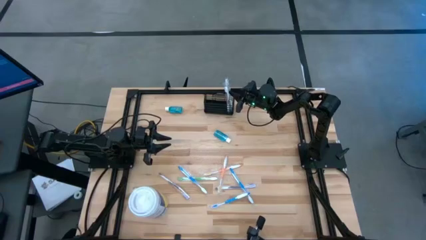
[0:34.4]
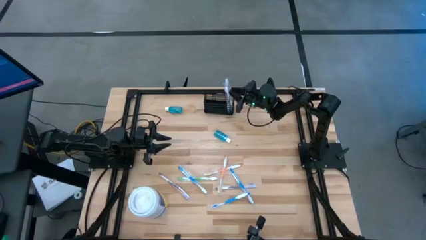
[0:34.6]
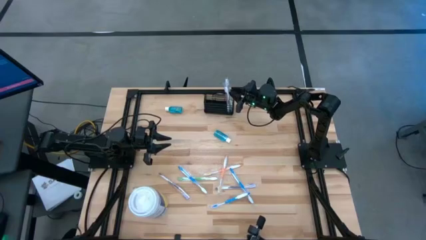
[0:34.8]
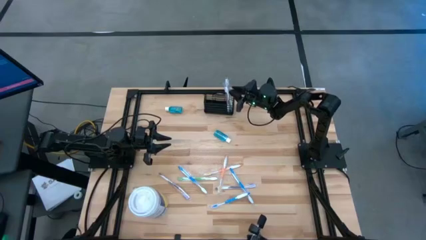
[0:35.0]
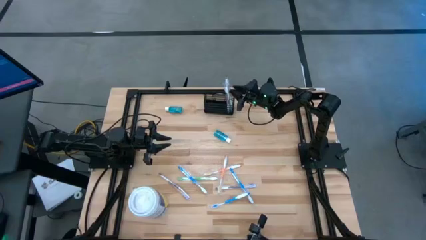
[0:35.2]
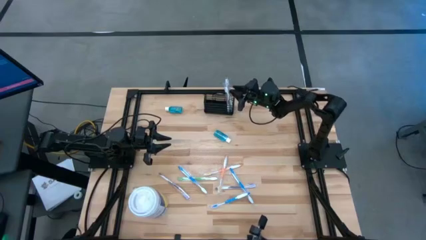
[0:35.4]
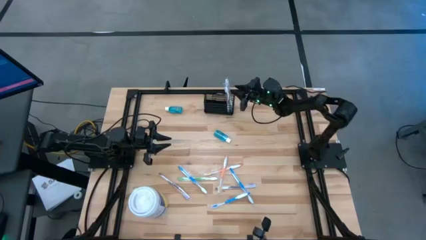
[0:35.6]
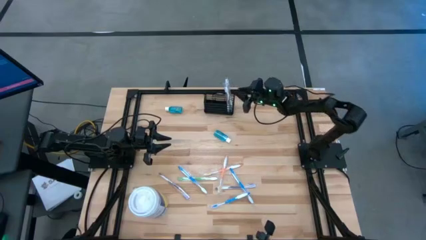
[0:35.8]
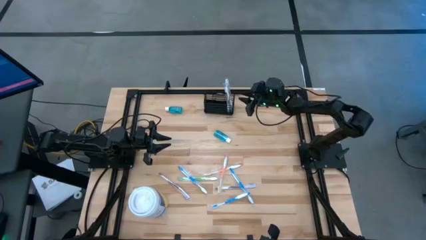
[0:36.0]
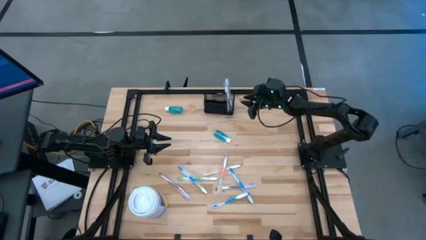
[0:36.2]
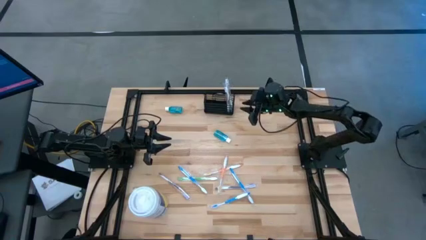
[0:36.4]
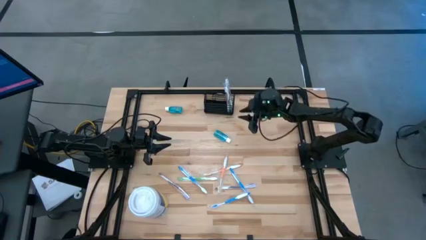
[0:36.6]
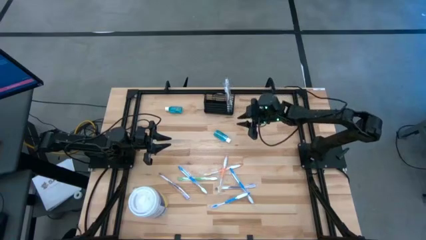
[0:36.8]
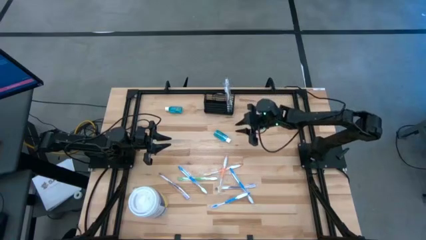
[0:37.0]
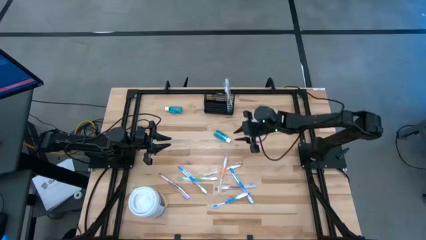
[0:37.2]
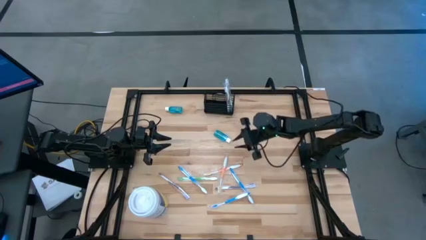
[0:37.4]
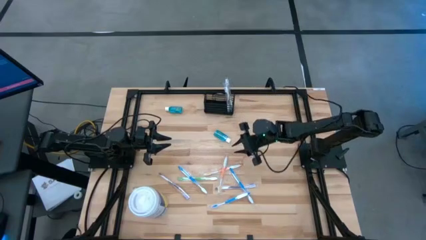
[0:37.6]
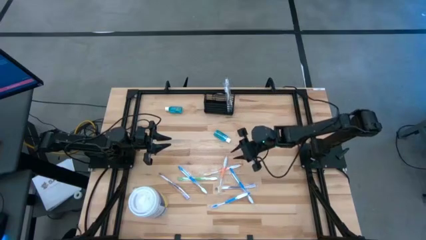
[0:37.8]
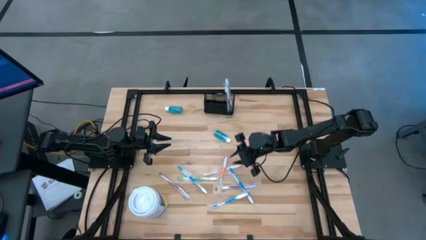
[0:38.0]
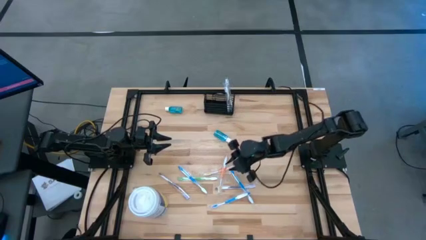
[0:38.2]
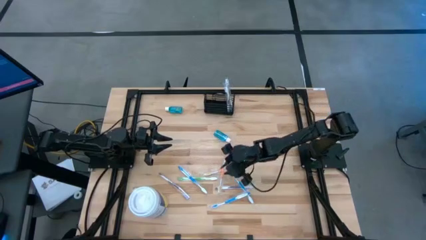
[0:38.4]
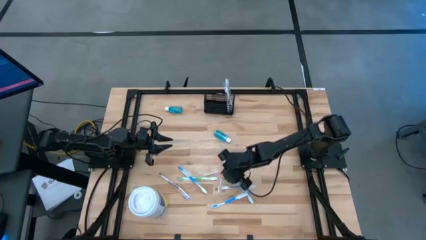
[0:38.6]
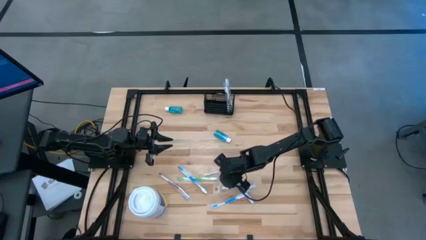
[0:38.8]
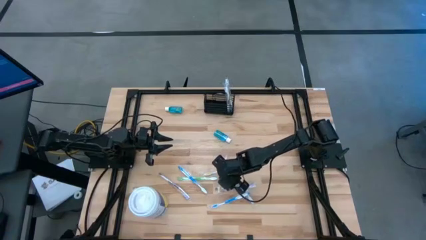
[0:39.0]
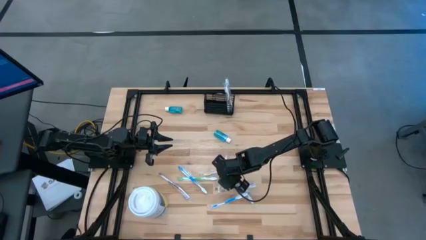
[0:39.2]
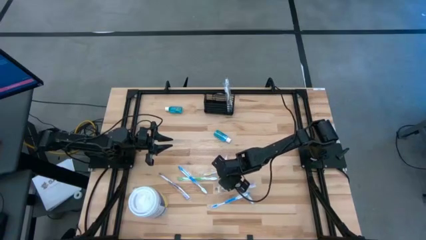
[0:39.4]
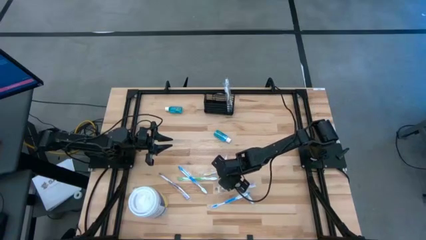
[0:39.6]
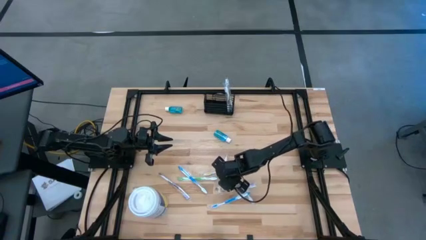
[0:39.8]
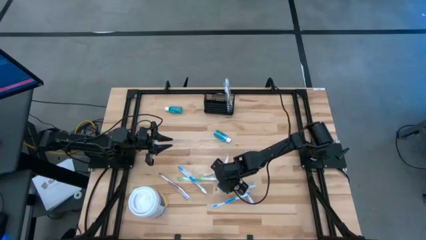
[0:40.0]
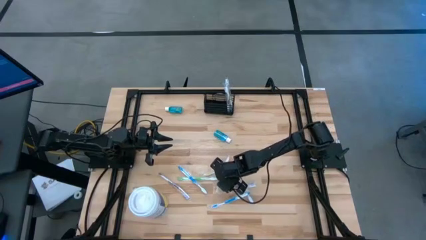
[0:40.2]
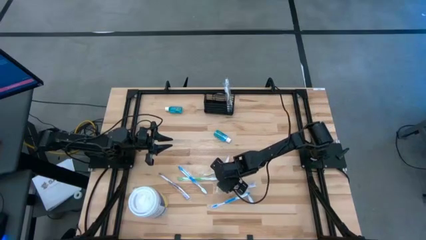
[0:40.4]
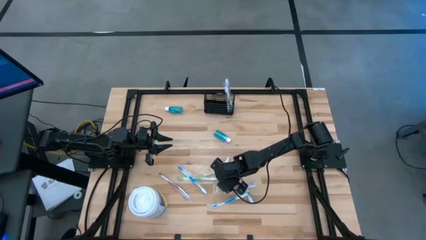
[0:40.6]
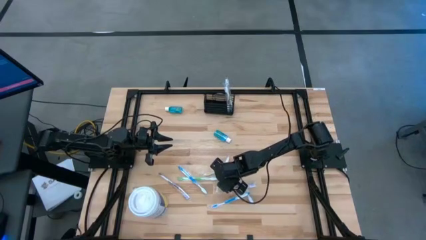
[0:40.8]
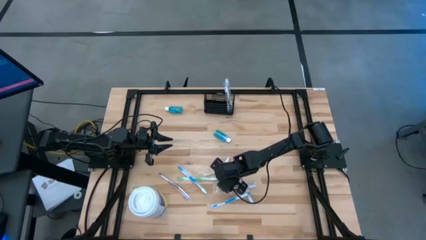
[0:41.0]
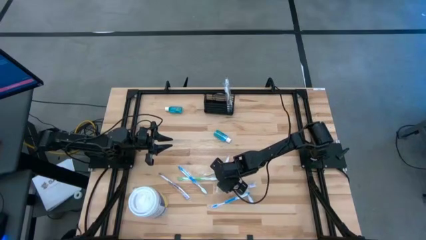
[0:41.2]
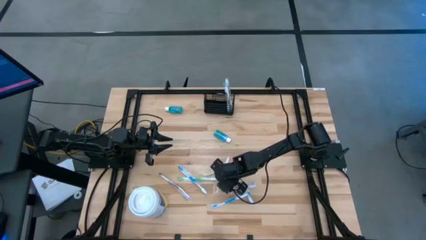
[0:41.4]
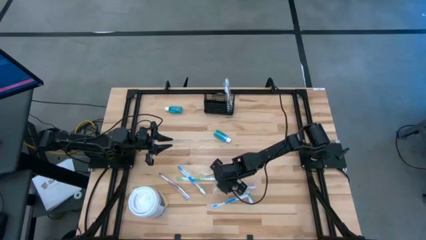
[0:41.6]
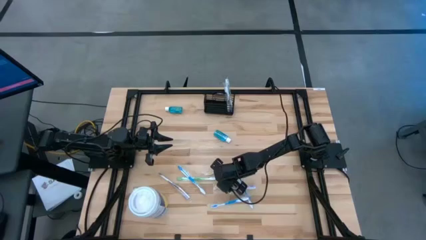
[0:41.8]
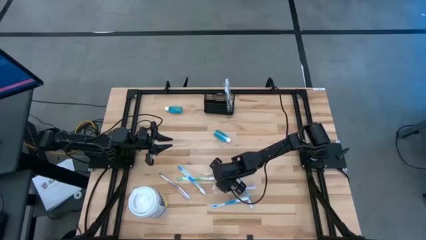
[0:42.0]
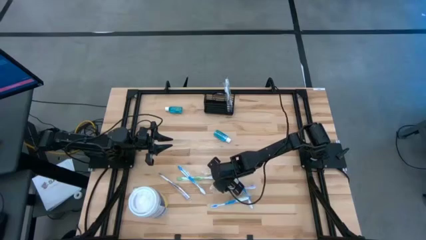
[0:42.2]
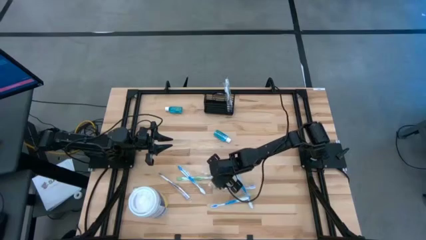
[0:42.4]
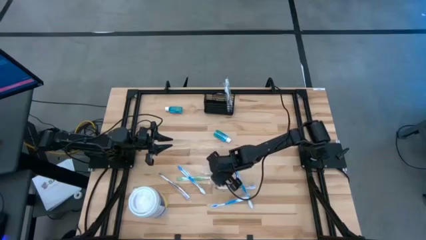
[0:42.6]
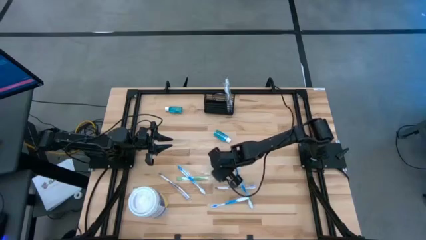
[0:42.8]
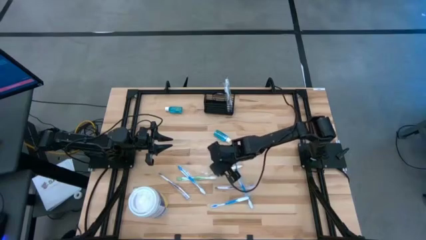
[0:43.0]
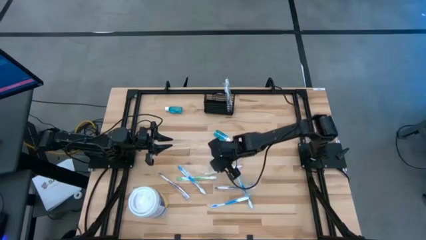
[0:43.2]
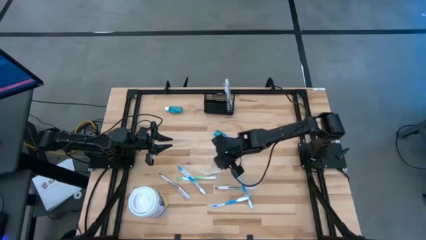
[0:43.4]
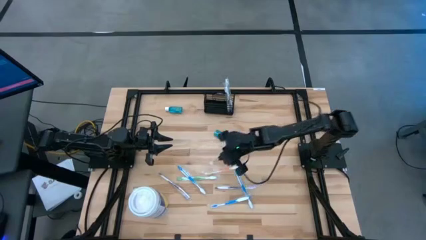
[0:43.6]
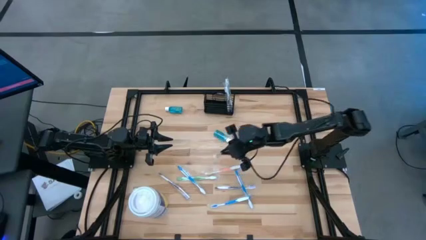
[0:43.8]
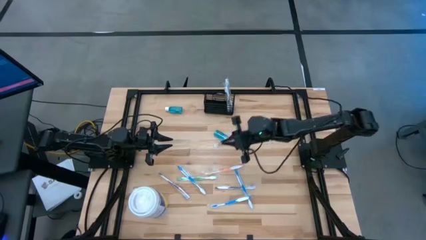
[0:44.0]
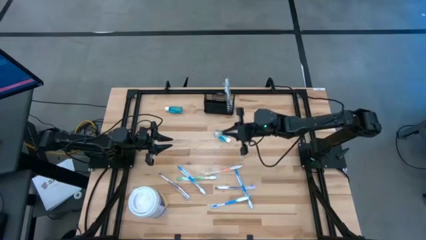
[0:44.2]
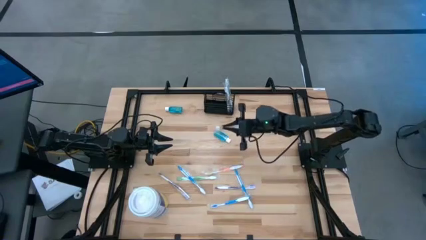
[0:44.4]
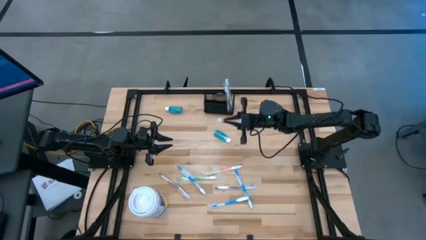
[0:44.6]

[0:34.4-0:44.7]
Task: Pick & Place toothbrushing station
Put the orange toothbrush into the mesh organizer
